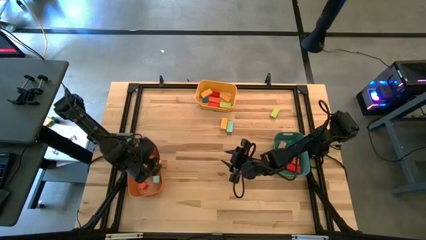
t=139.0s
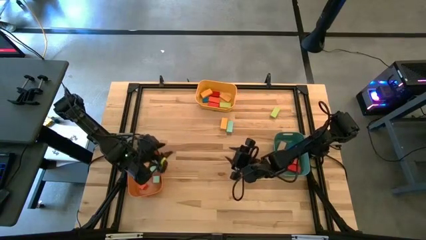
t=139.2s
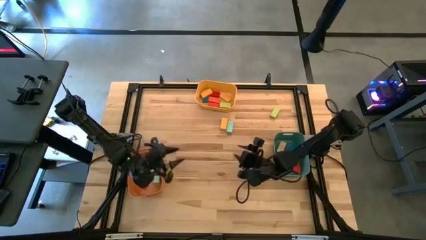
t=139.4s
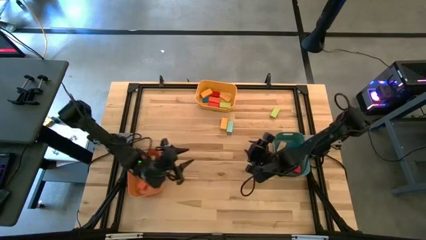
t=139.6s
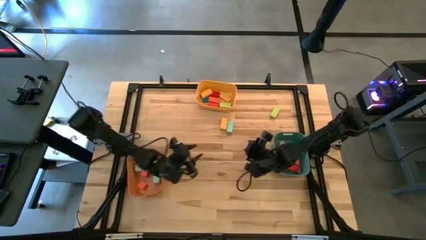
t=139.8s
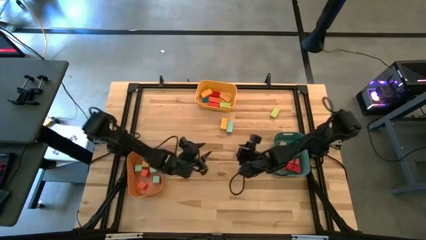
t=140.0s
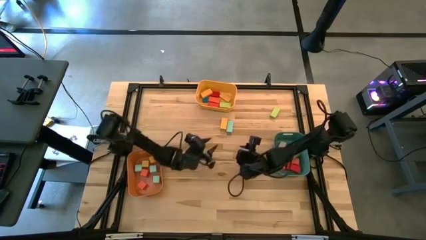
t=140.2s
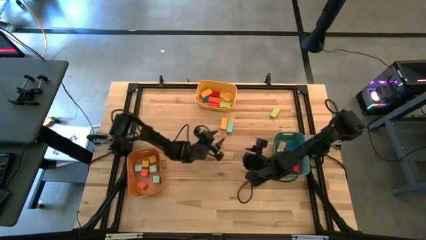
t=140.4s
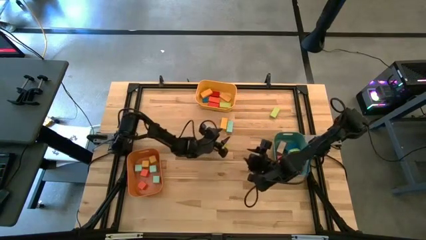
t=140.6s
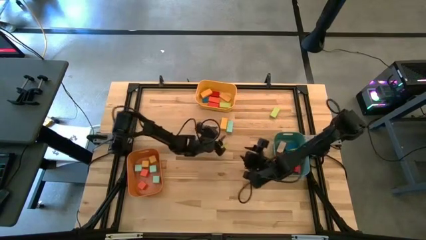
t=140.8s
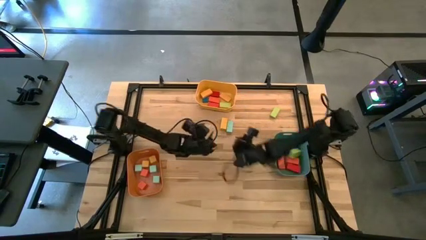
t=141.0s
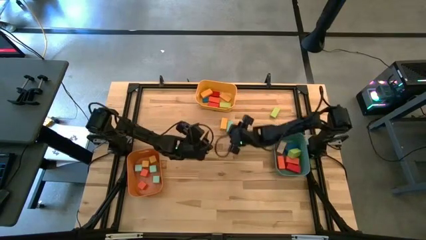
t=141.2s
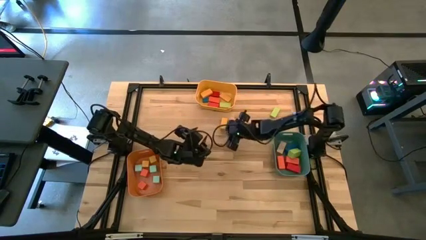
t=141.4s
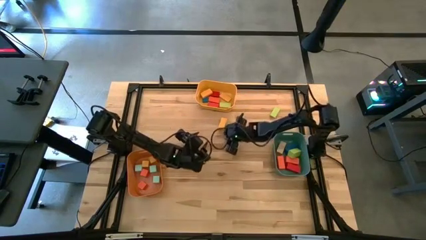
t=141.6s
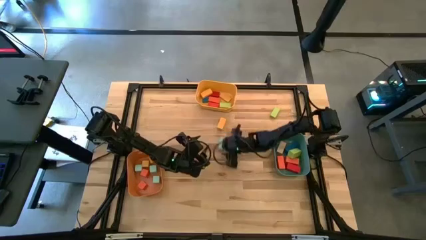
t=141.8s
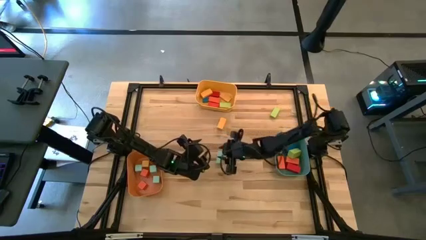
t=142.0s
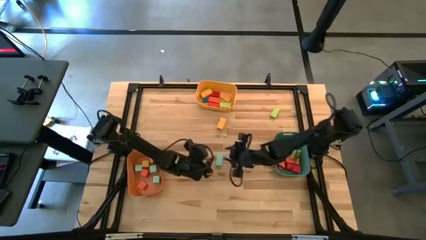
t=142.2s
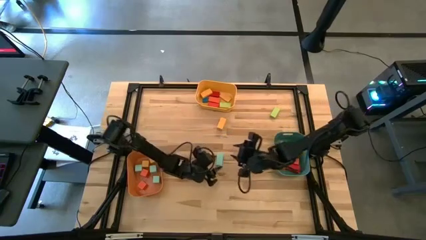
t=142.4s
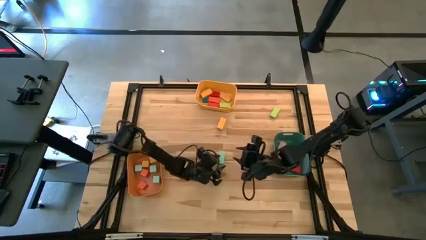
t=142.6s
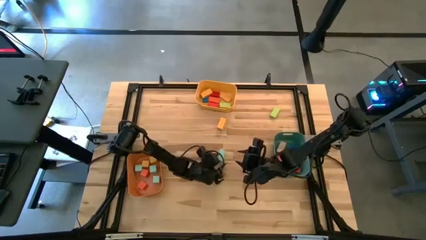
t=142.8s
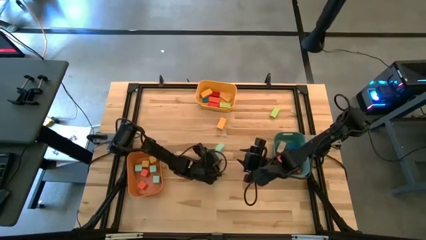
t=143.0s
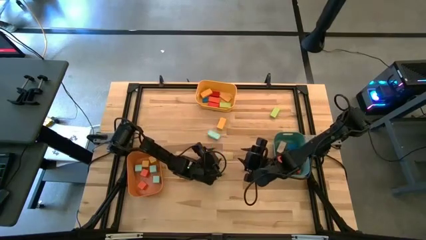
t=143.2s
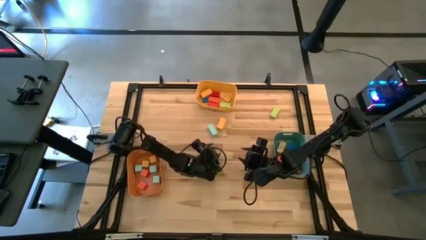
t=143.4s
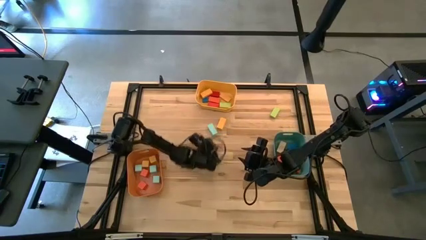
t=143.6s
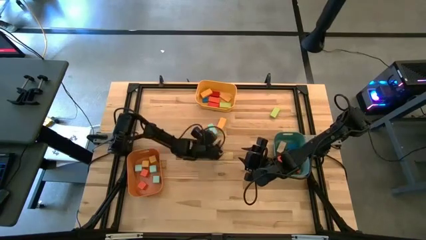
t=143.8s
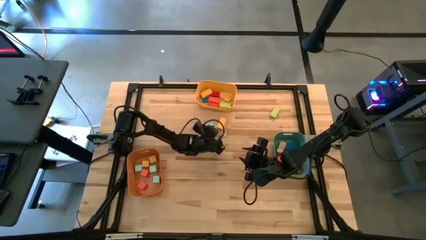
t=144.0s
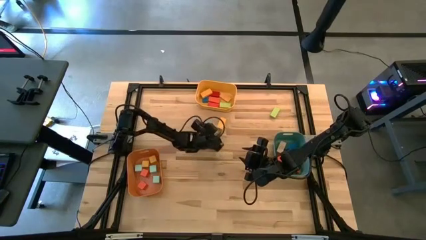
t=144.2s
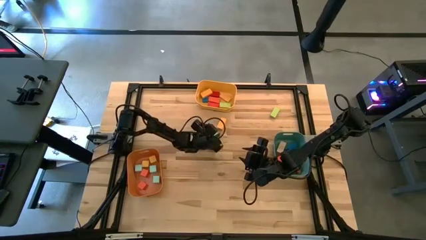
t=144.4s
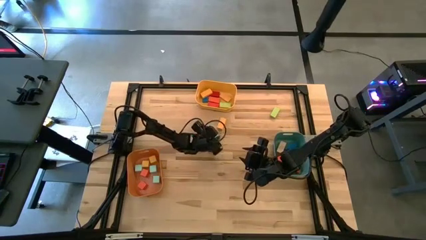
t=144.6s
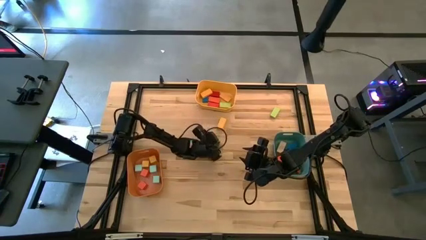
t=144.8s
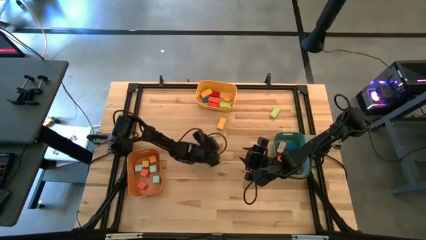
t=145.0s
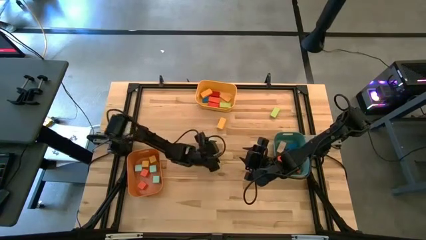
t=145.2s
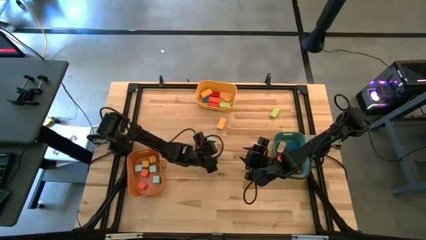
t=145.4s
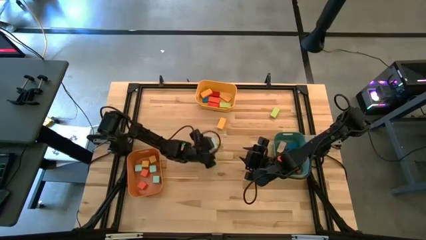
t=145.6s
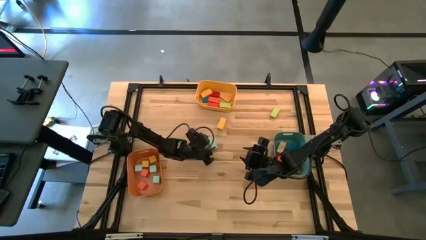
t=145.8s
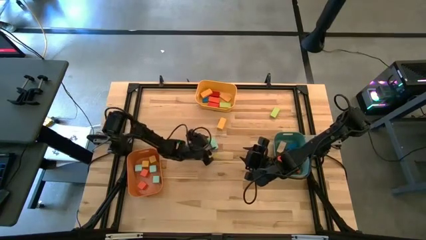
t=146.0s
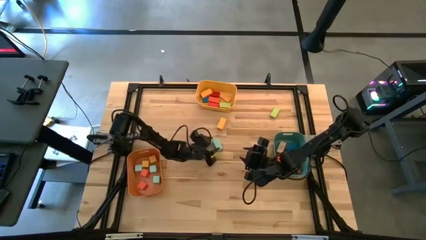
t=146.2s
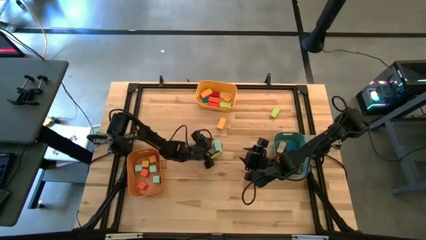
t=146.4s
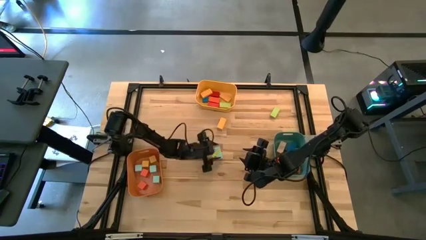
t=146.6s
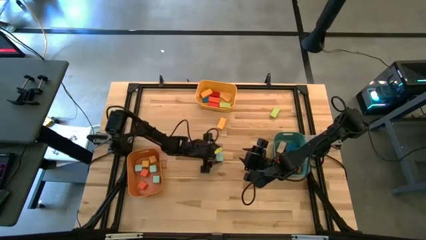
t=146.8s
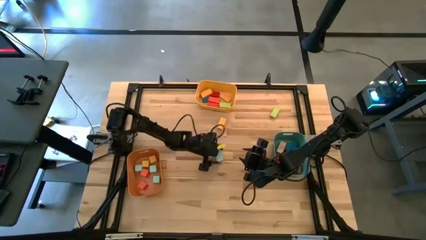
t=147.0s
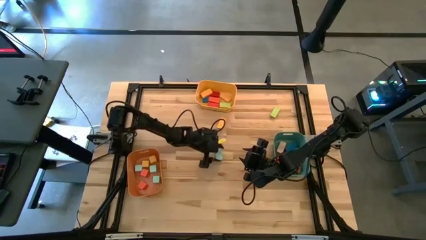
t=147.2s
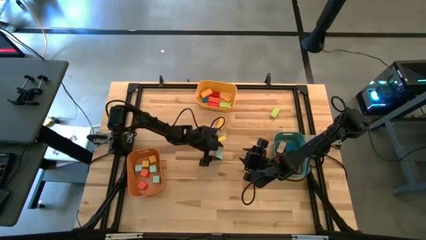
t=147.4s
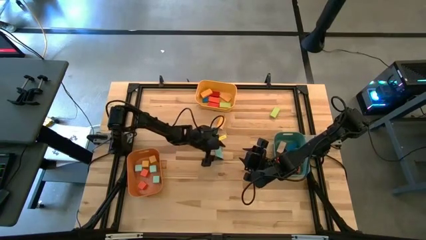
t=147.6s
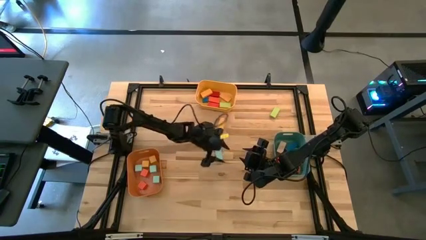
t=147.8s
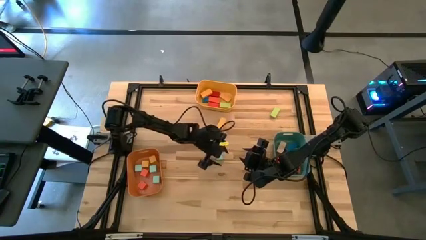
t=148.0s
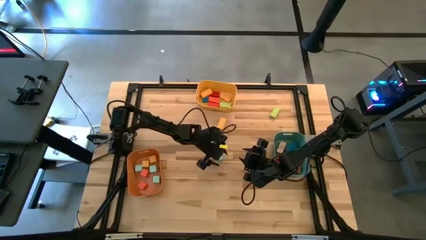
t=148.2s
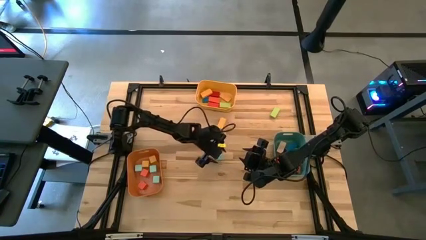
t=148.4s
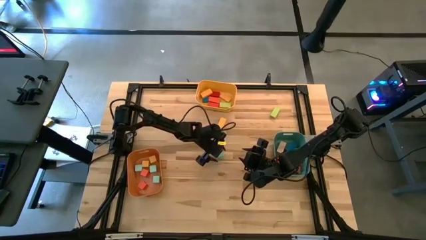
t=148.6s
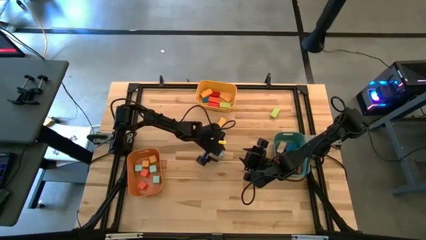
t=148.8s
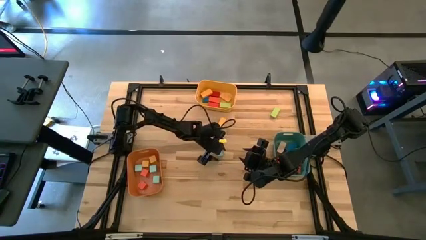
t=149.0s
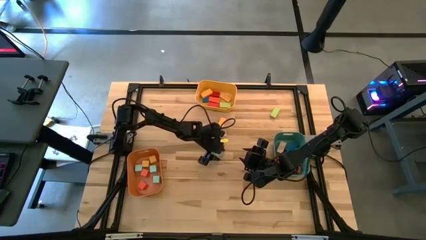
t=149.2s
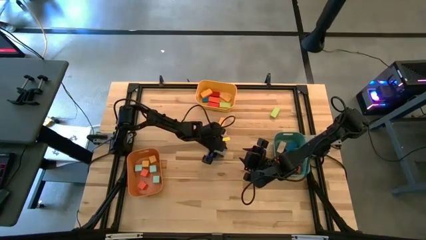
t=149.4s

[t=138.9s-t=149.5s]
Task: Sort blocks by size
Put the thin light blue rectangular block into the yellow bin

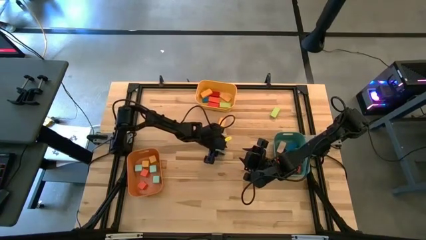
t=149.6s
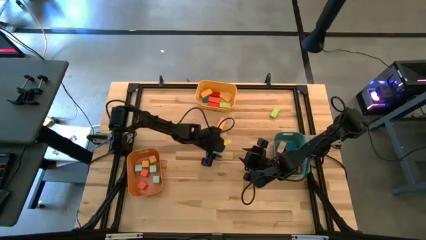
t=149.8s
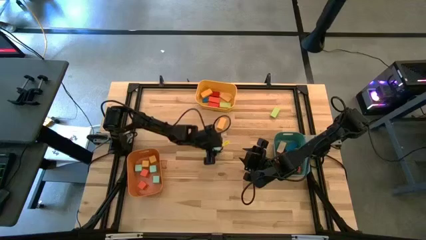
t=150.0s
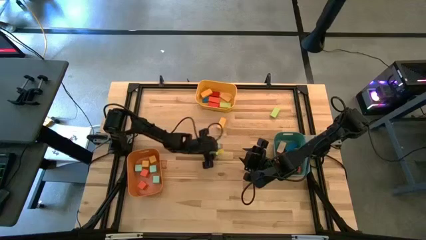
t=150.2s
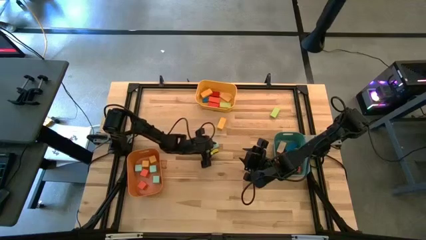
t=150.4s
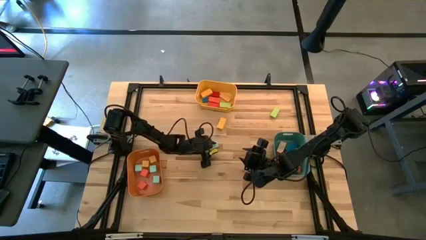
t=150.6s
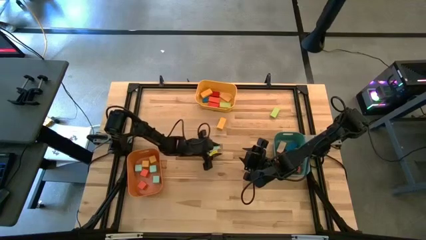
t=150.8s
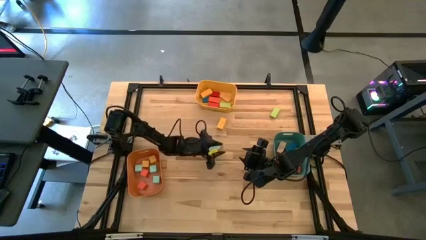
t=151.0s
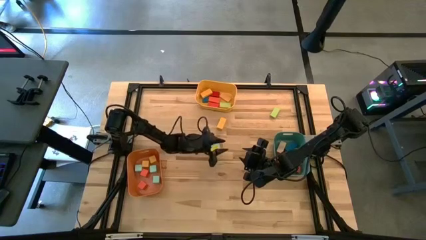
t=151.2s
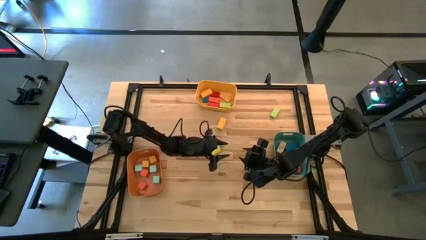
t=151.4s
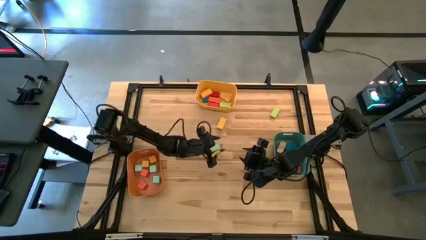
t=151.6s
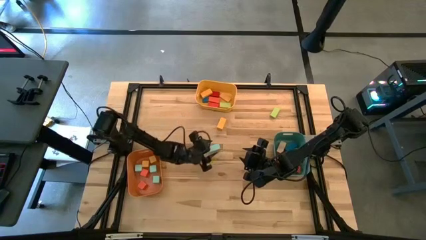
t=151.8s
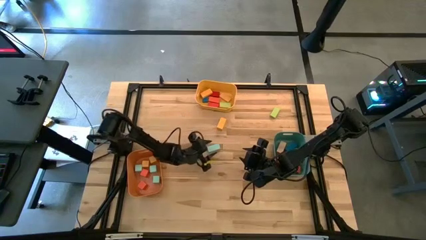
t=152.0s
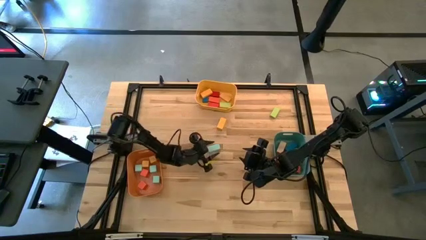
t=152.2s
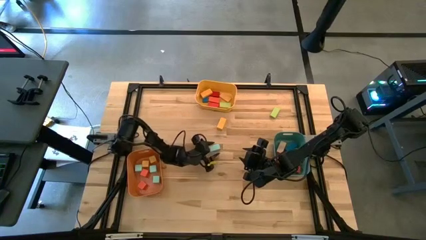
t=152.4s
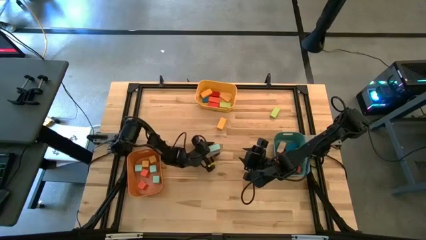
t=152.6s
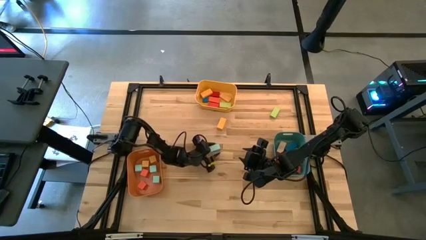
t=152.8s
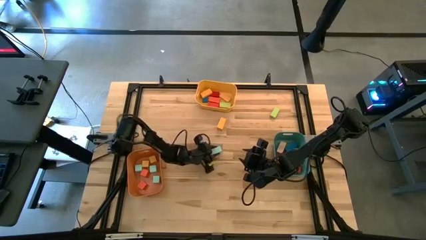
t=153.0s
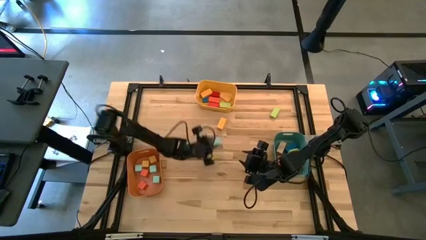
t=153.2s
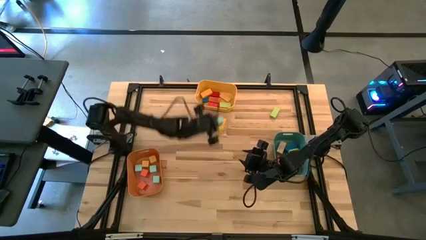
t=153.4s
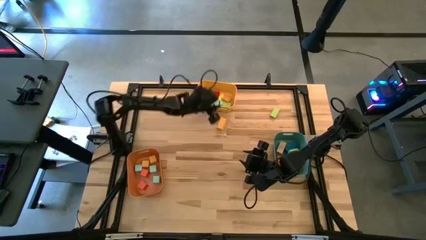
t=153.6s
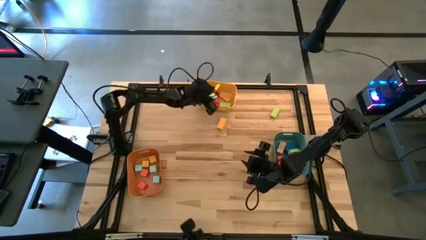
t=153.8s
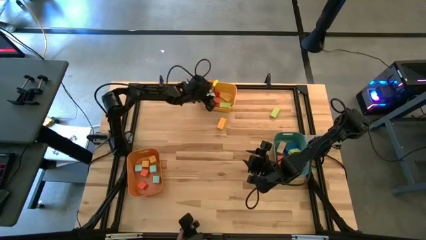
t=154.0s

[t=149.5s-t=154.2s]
Put the thin light blue rectangular block into the yellow bin
